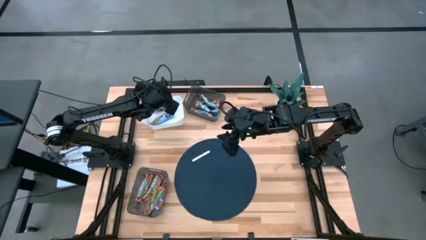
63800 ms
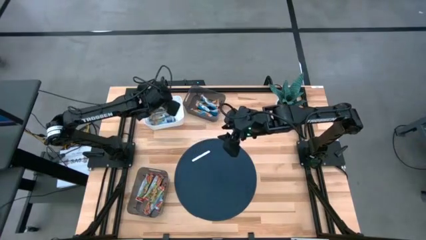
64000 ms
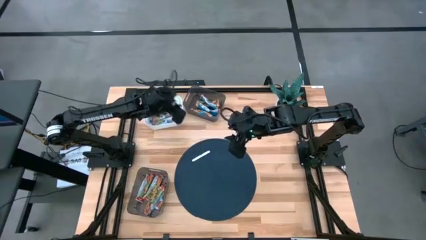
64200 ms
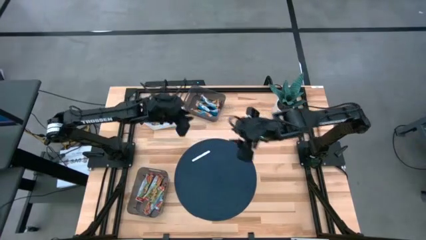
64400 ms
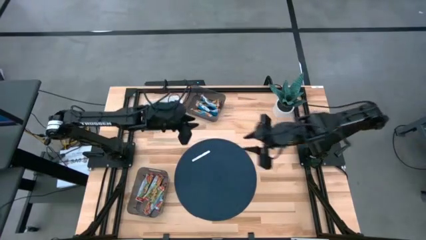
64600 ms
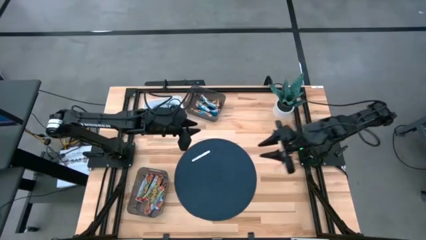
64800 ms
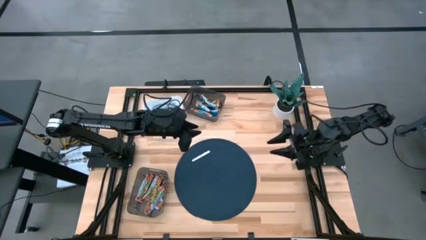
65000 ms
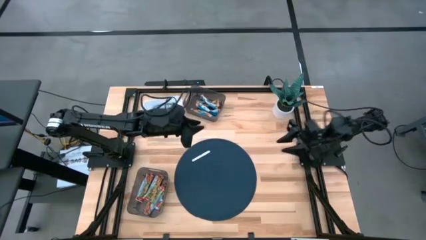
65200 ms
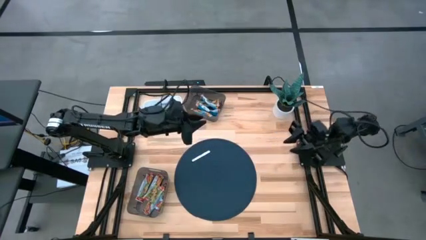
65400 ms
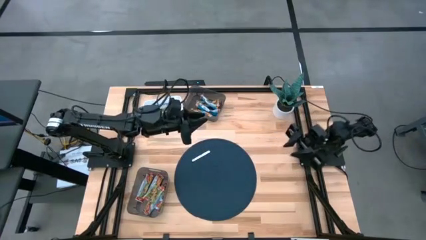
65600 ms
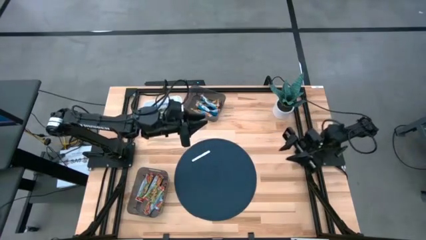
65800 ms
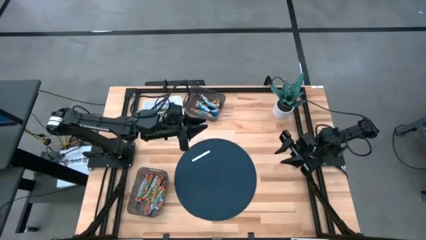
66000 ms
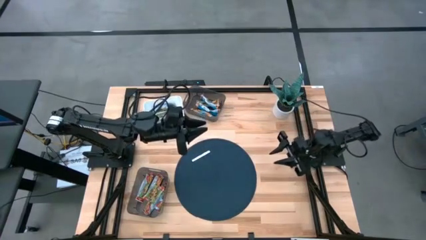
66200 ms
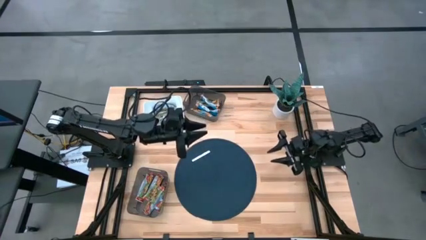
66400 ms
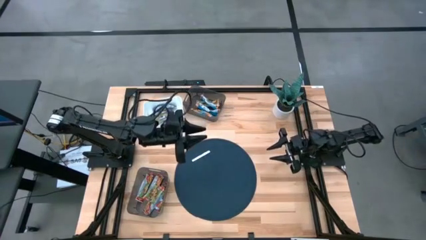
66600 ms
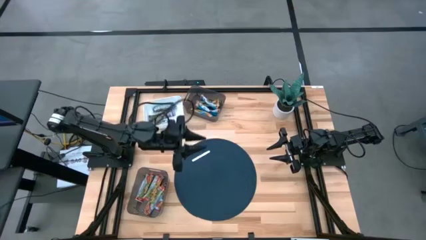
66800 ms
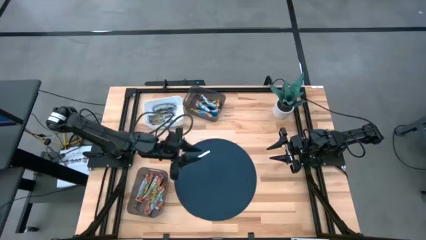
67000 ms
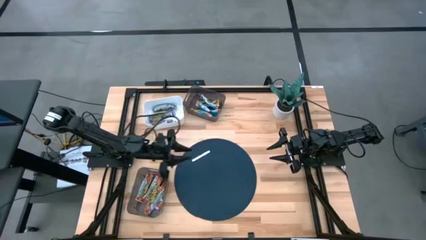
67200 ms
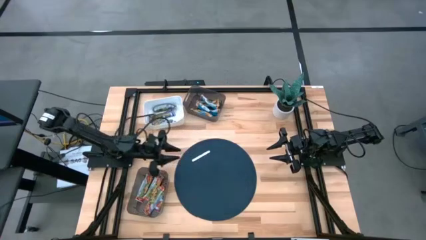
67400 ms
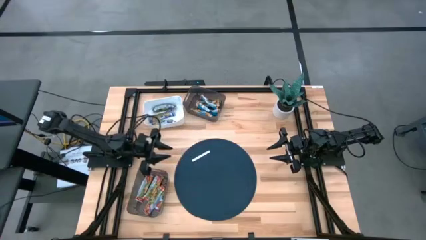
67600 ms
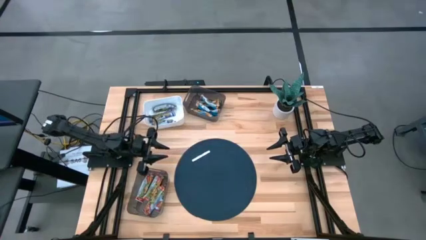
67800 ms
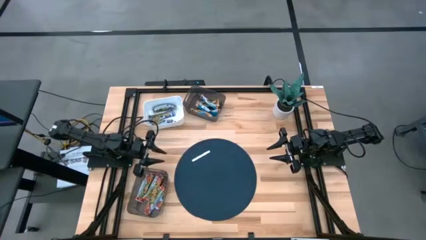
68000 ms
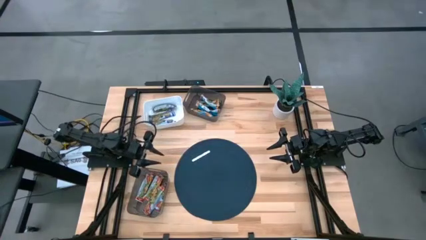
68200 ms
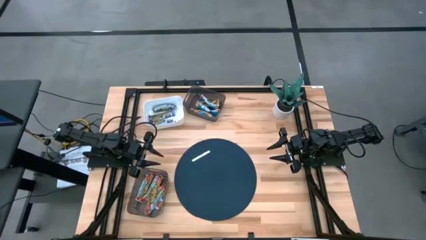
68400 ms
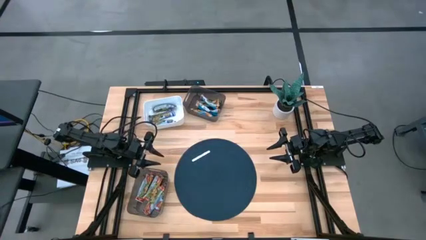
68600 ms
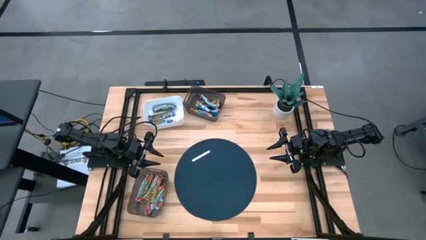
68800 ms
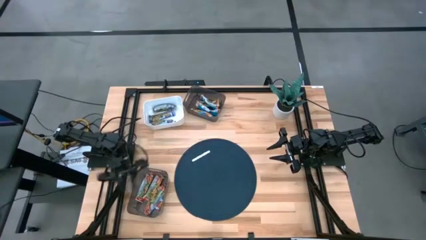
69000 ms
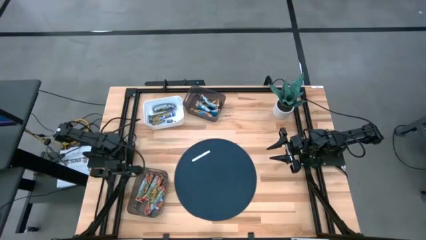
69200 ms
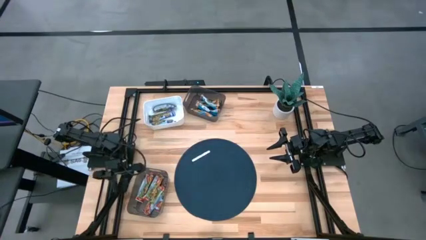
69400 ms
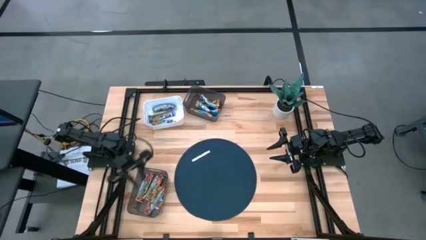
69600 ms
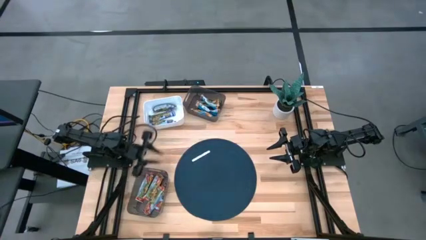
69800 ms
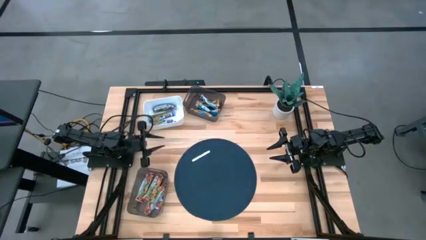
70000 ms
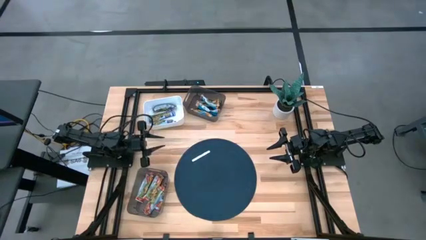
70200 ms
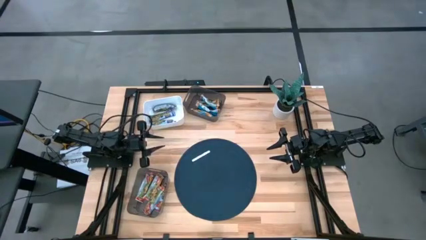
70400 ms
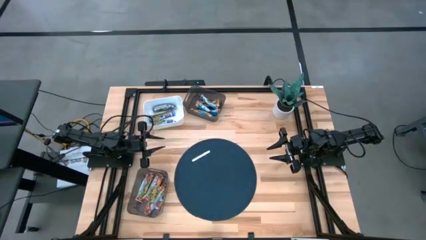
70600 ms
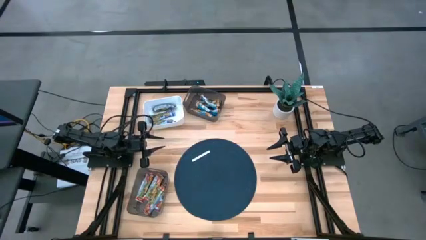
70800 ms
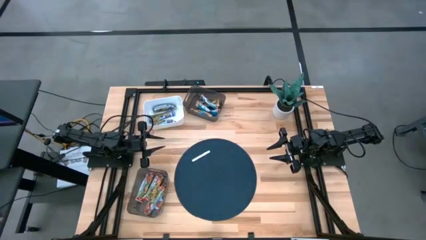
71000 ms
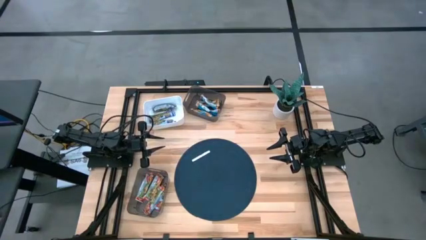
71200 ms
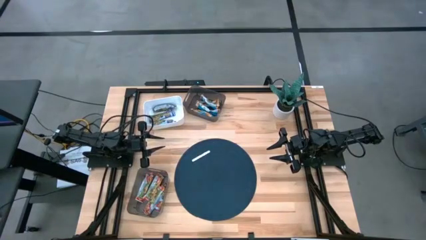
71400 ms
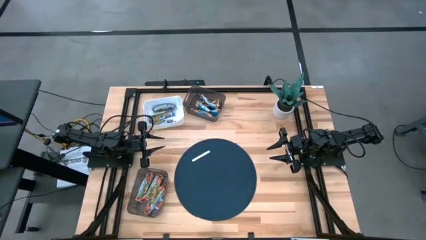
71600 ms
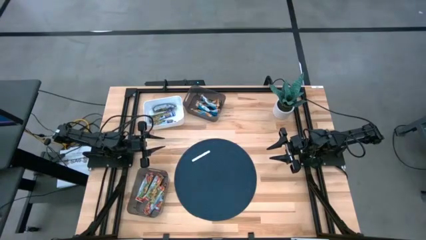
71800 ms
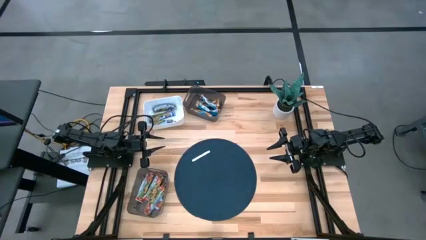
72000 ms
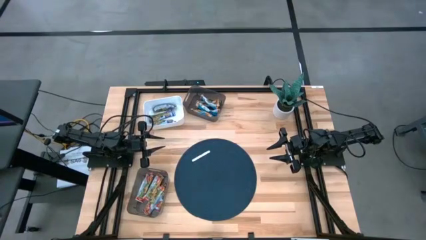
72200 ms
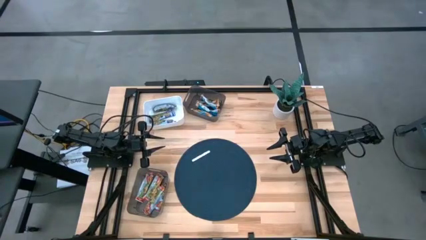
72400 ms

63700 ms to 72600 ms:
Task: Pick and place Granola Bars by type
Return to Home Position

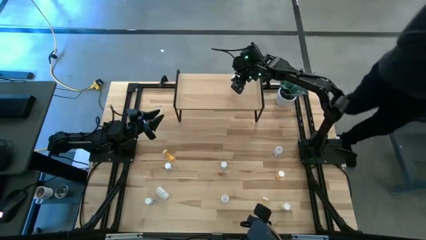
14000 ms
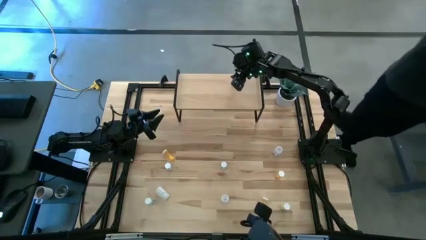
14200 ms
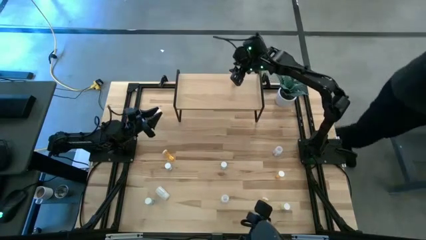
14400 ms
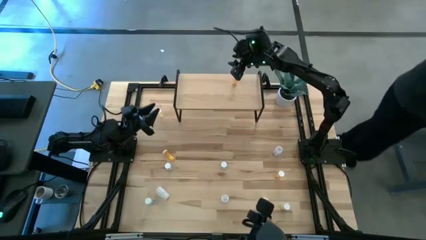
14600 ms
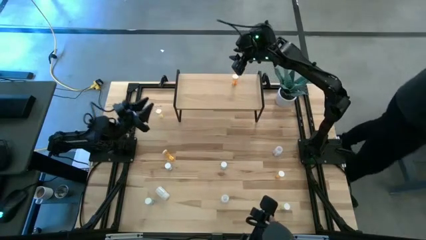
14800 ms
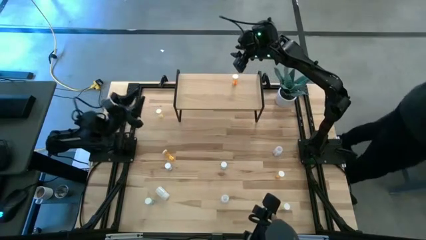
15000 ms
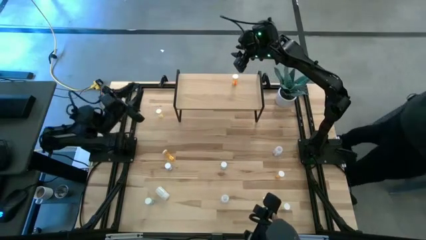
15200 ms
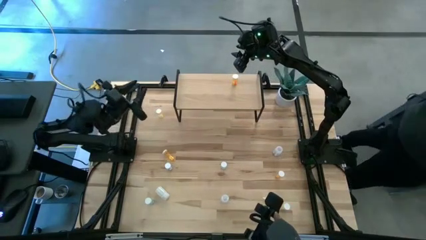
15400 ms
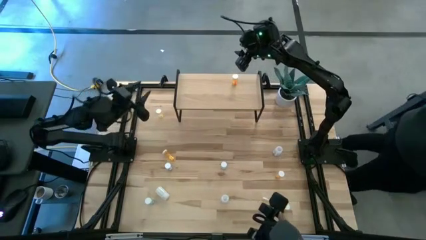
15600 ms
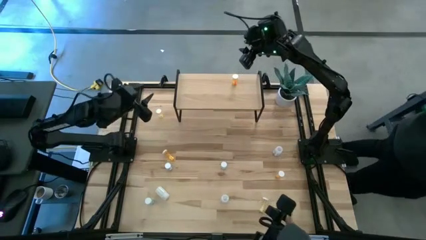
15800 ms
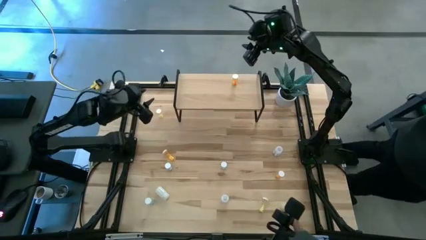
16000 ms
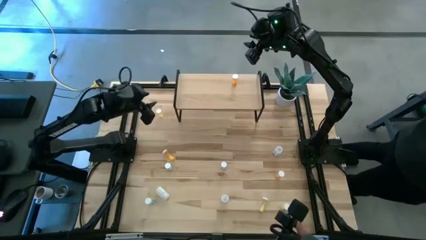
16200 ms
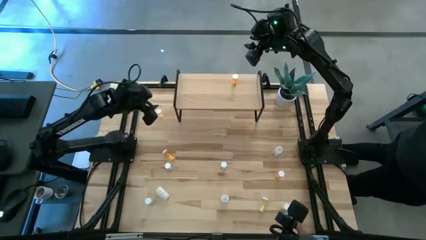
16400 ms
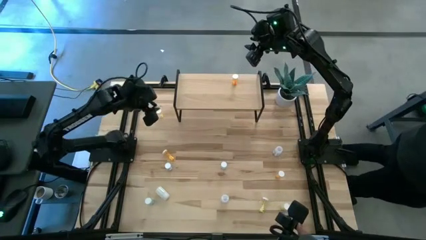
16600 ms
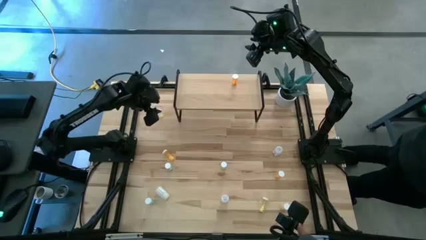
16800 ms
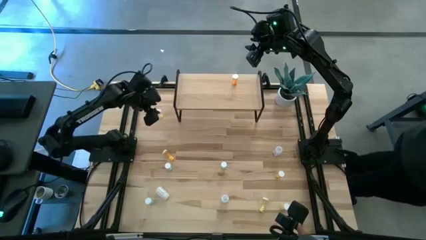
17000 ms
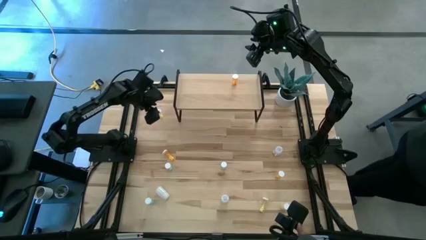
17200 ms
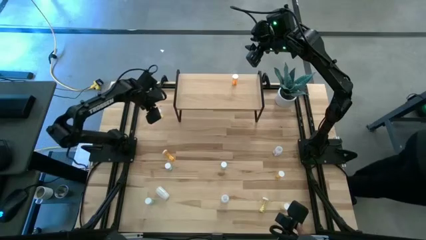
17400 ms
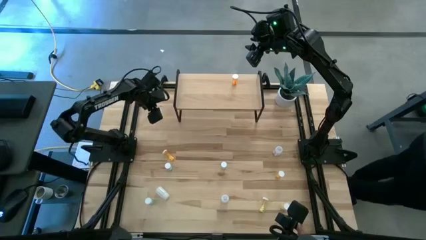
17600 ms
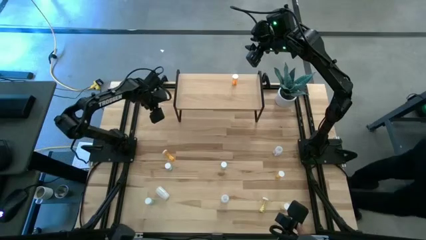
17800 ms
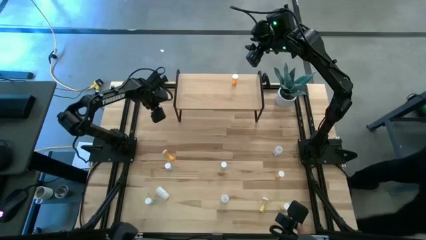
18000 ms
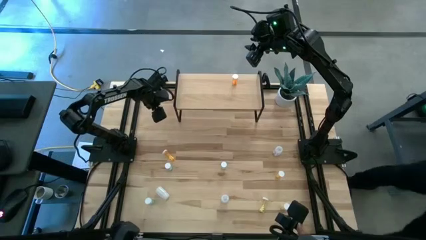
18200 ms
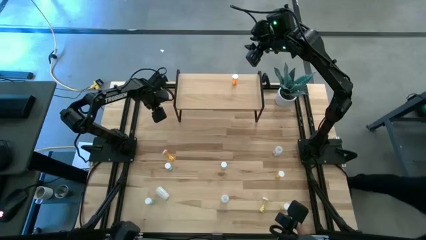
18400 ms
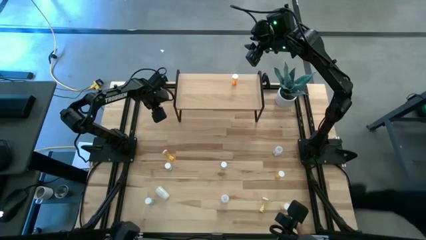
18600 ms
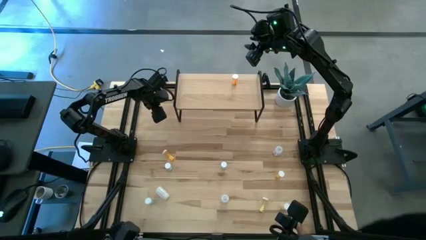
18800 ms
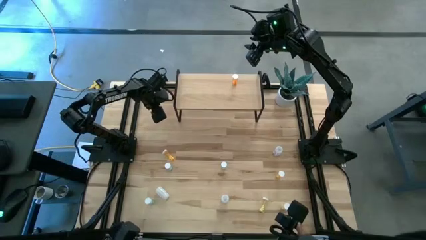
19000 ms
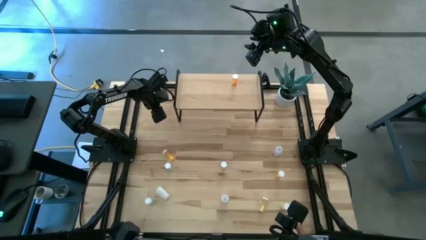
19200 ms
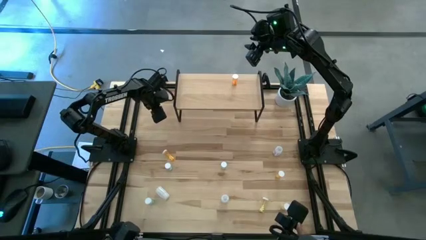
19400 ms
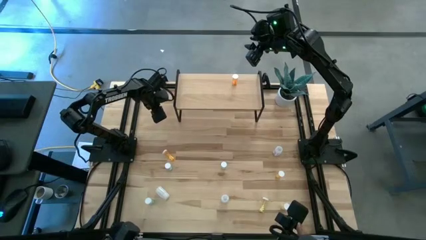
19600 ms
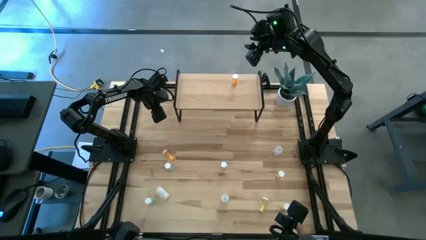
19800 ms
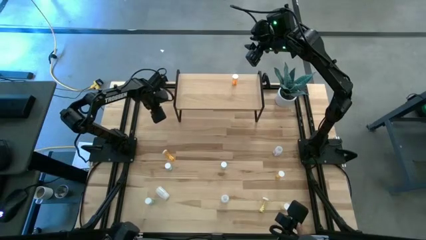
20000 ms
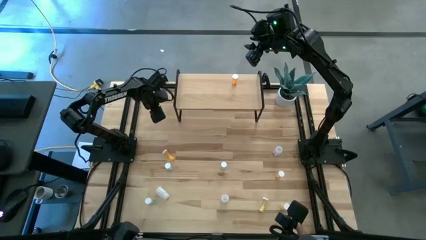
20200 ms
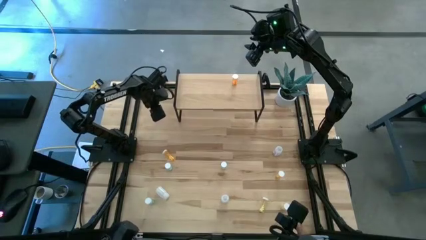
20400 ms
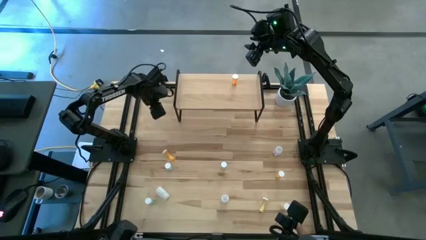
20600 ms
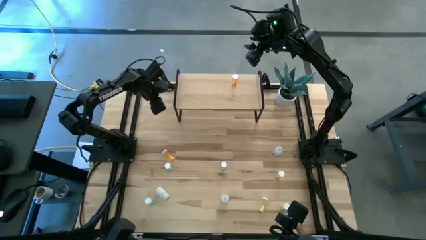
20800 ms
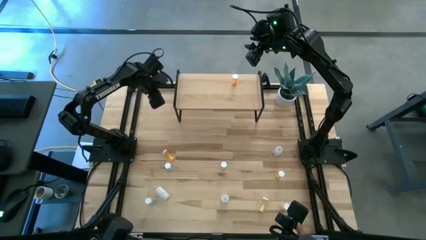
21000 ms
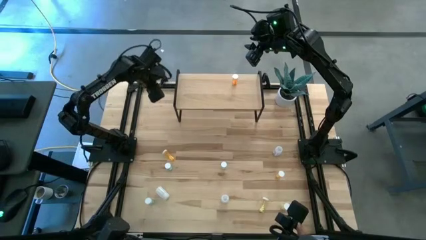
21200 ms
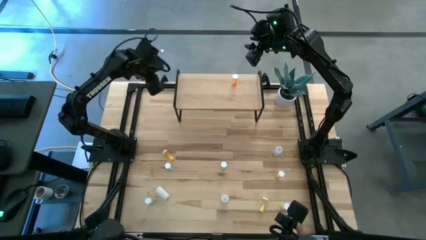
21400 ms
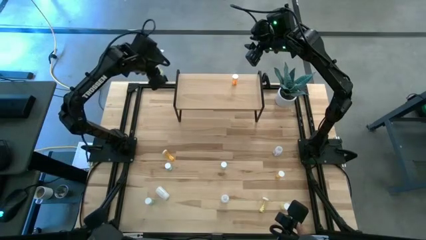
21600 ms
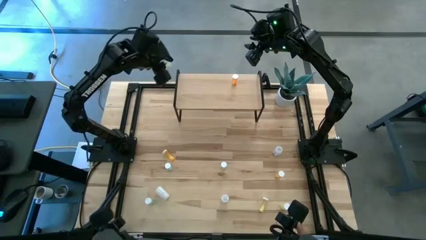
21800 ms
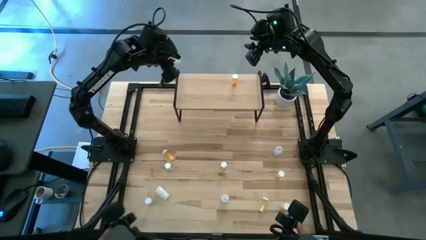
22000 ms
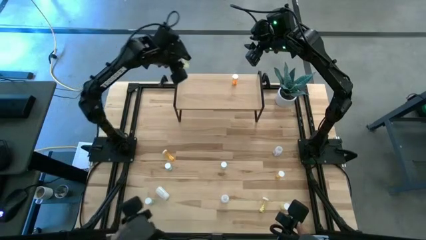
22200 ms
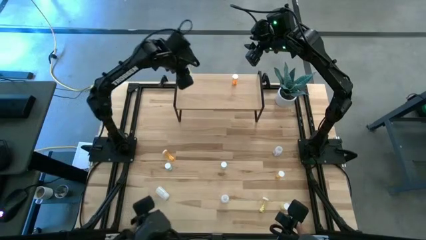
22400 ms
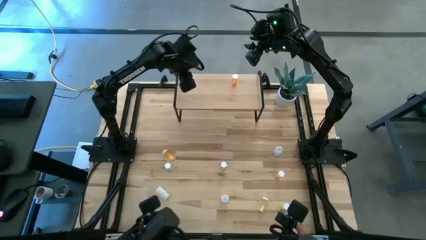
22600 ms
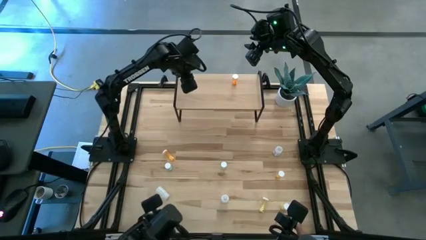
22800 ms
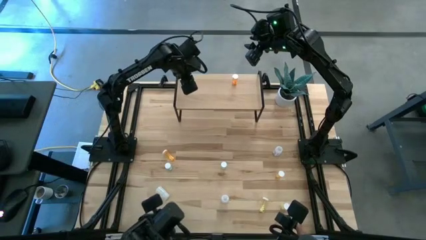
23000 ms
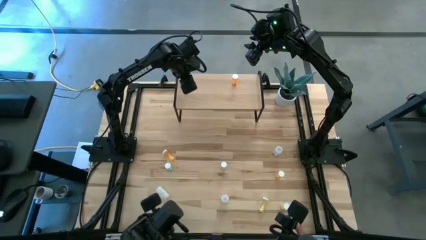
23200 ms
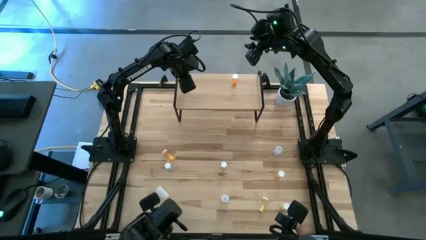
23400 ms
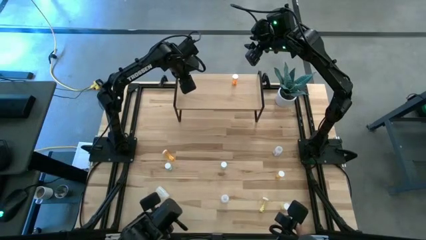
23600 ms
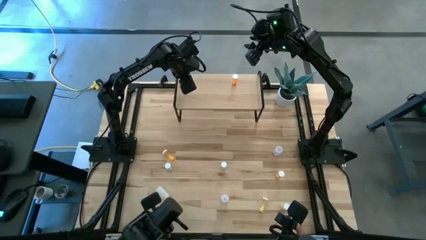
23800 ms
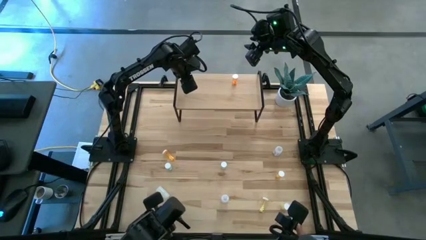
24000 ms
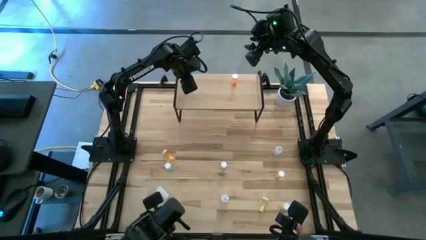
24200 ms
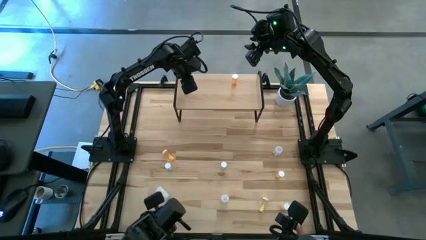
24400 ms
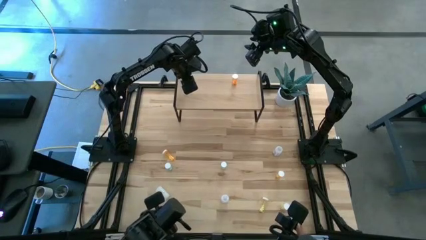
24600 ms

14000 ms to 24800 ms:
Task: Pick and place medicine bottles onto shelf by color
Put the top yellow medicine bottle on the shelf
